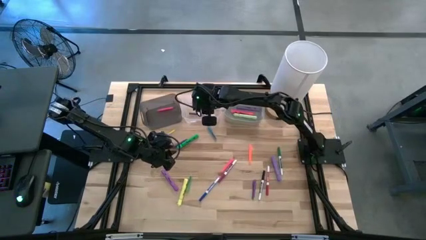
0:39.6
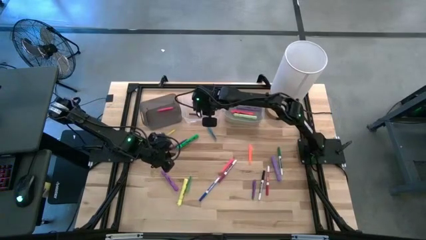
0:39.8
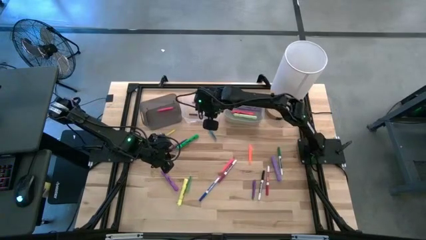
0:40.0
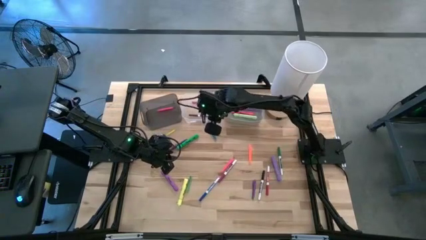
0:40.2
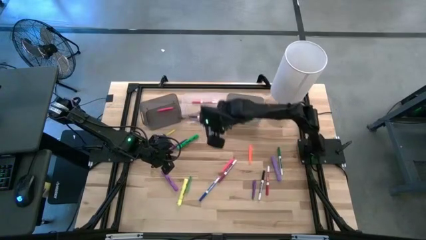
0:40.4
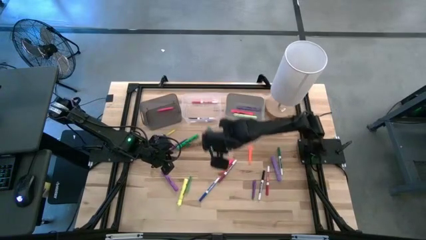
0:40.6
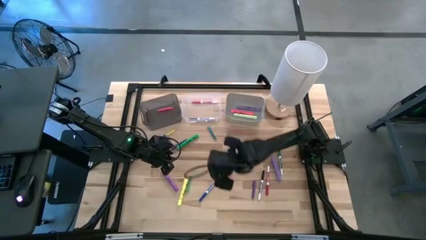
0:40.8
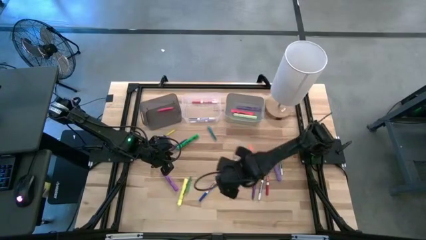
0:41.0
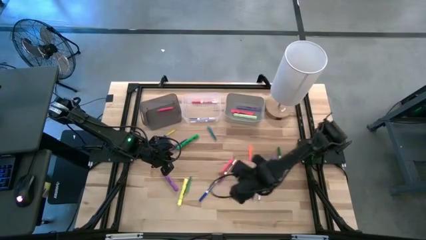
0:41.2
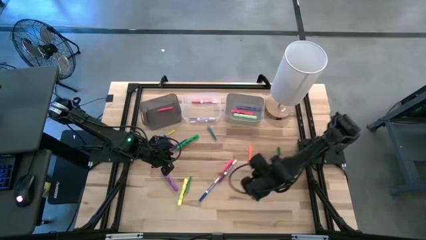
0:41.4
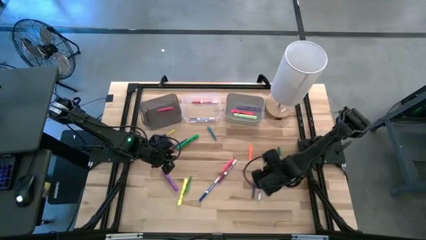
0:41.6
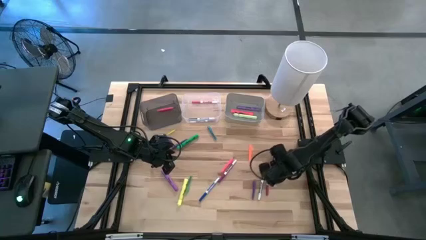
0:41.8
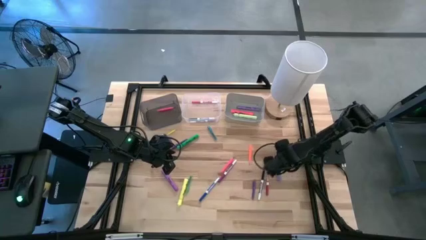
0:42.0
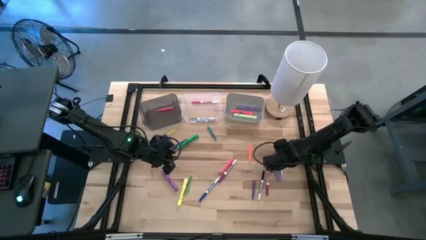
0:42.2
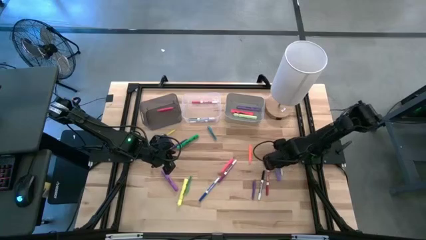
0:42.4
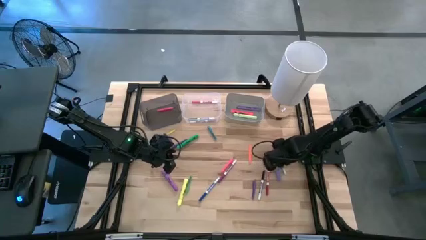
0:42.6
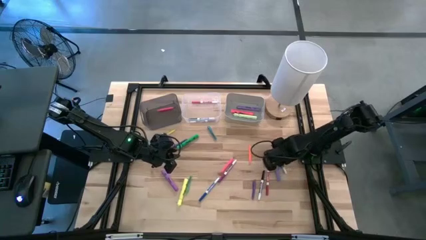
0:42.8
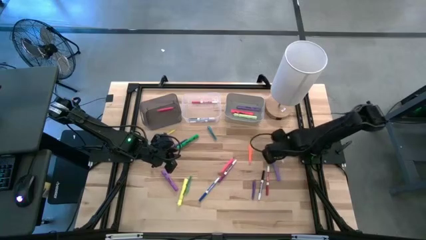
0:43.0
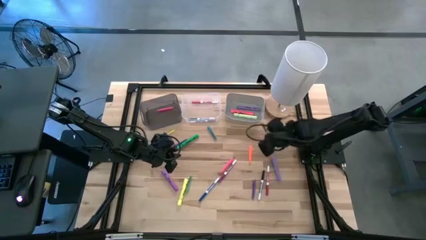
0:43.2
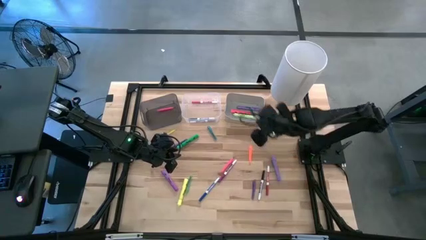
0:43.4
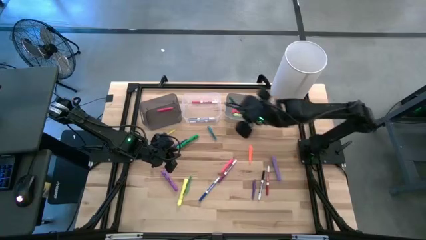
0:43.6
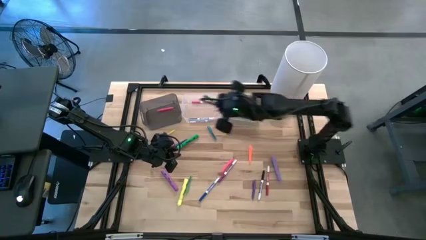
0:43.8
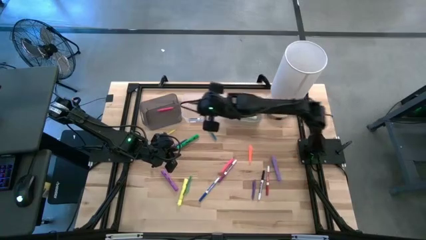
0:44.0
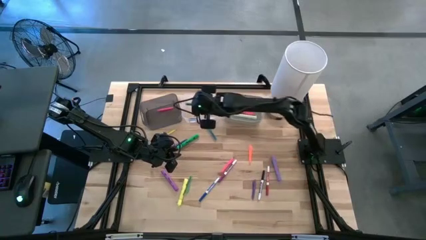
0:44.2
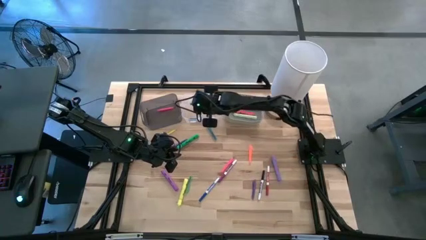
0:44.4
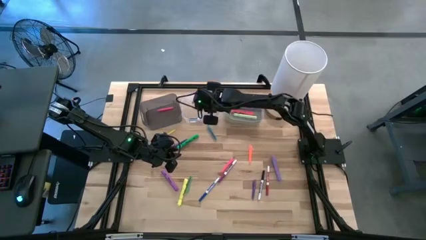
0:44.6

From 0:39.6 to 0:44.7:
Task: Pick & Place Markers
Put the green marker pen into the transparent bin

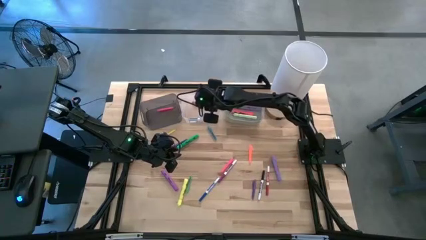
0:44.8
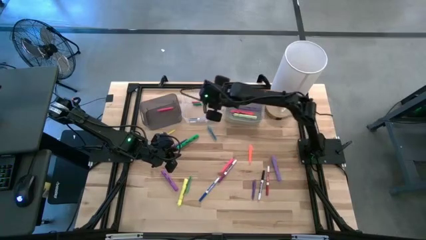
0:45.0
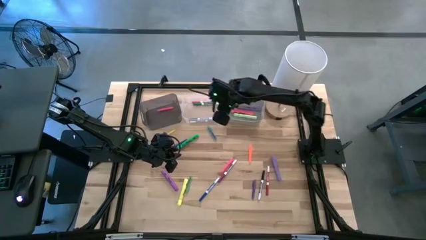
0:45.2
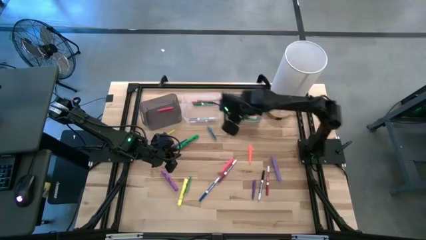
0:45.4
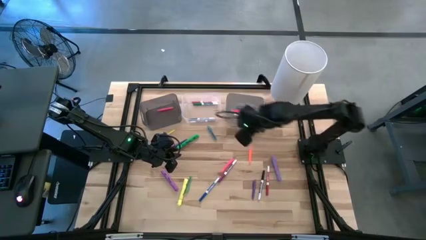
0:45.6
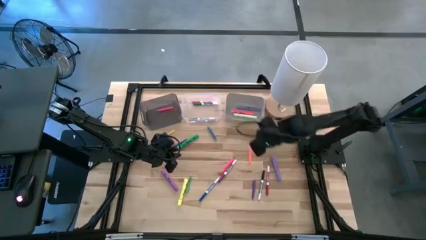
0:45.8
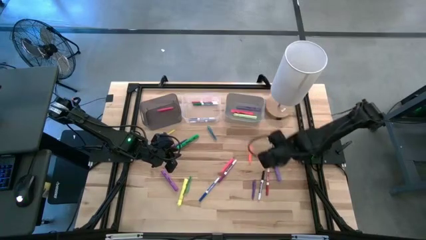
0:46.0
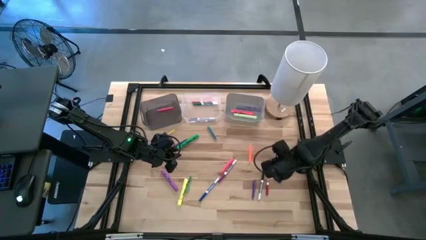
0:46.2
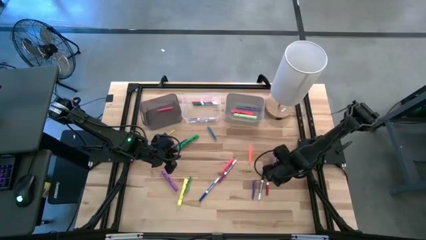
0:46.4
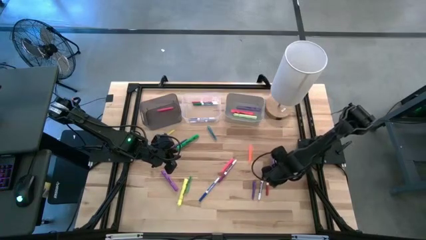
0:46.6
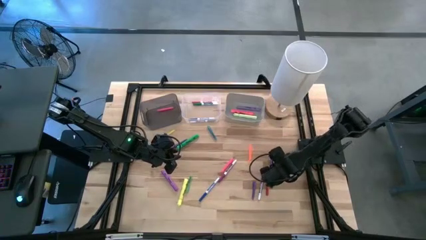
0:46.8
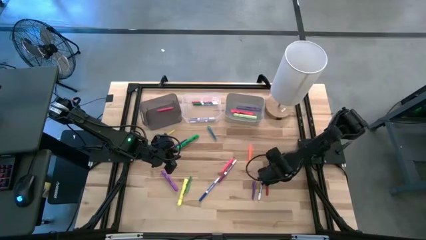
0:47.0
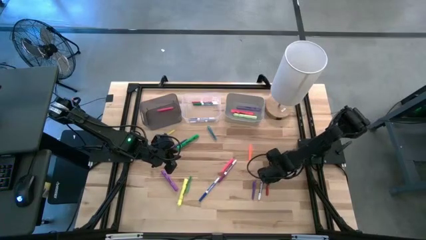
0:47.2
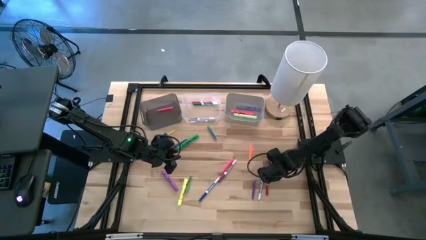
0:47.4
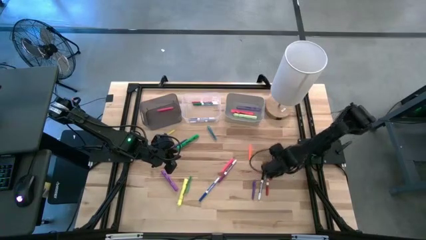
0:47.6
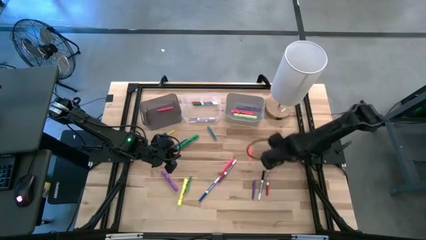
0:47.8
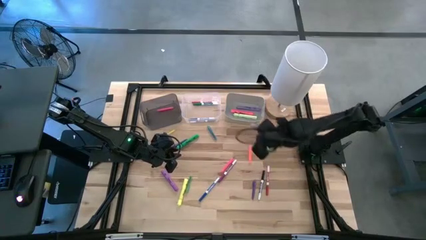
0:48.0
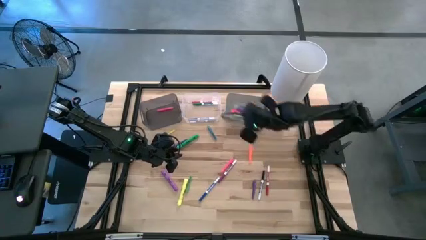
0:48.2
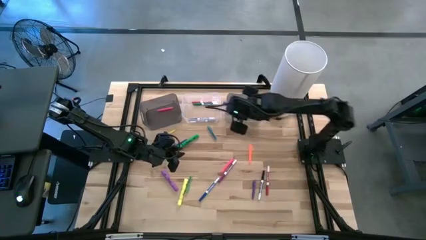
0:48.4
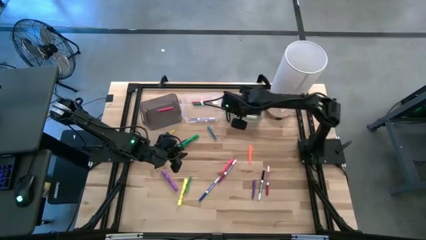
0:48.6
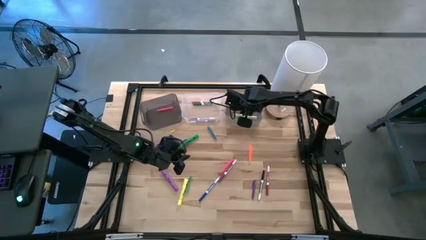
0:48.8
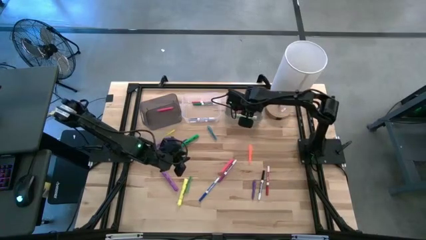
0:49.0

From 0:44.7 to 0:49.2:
Put the violet highlighter pen into the gray bin

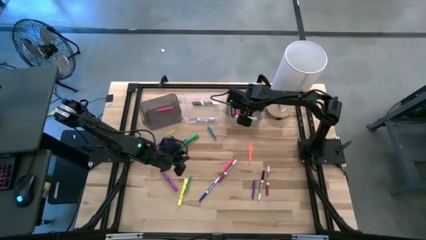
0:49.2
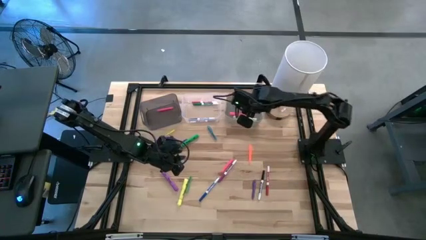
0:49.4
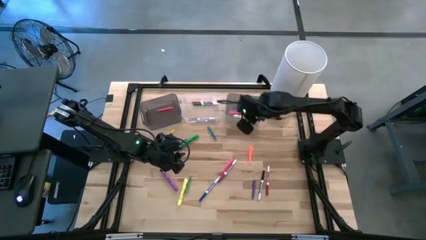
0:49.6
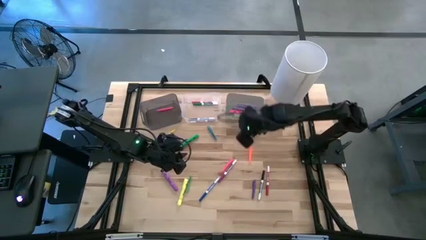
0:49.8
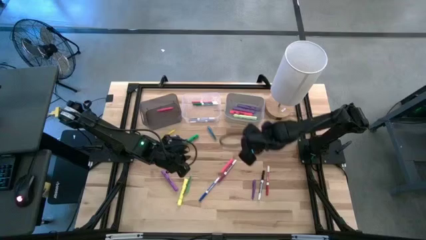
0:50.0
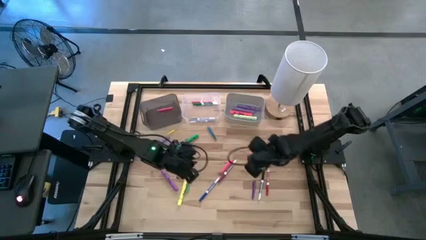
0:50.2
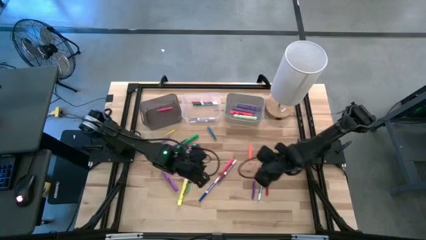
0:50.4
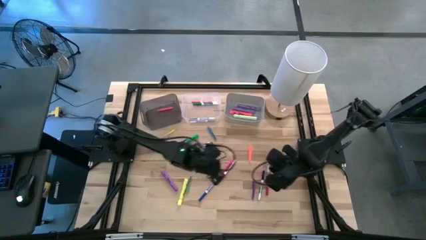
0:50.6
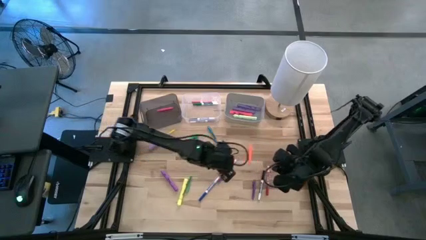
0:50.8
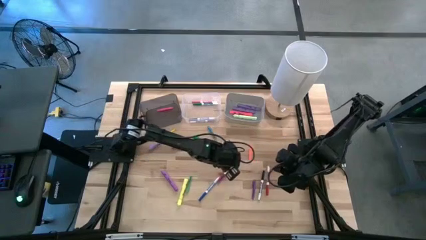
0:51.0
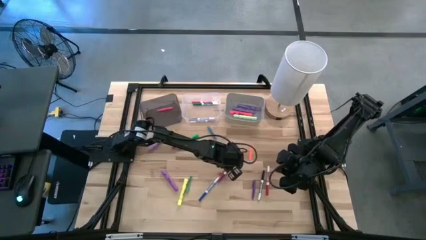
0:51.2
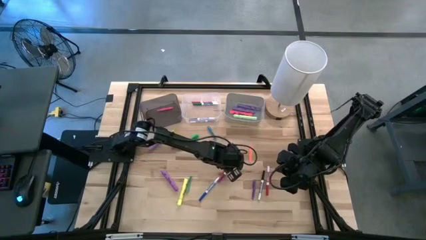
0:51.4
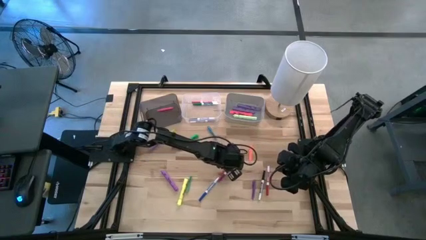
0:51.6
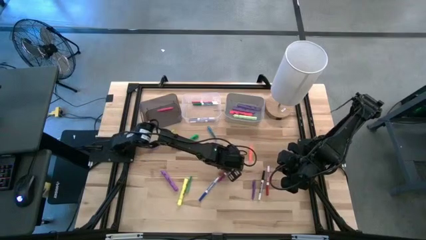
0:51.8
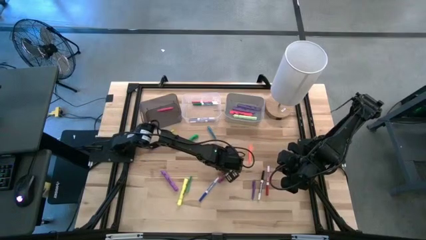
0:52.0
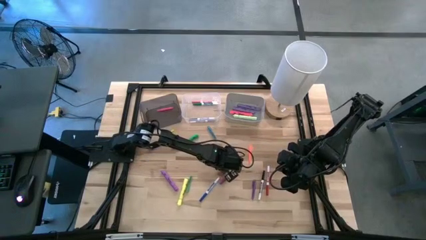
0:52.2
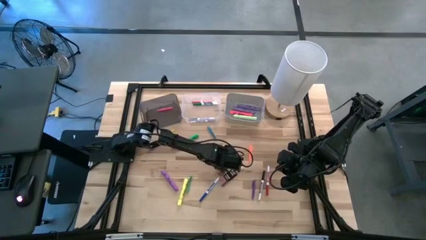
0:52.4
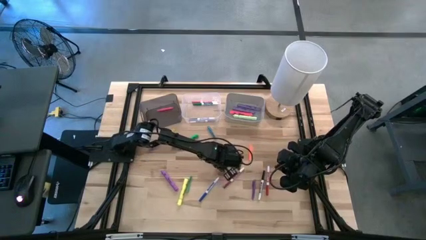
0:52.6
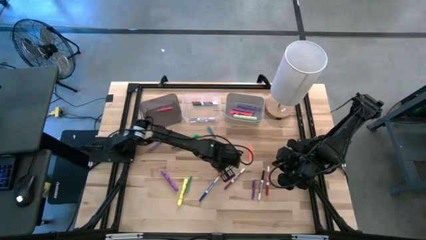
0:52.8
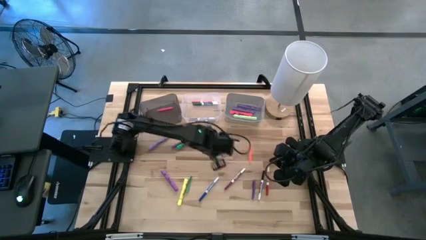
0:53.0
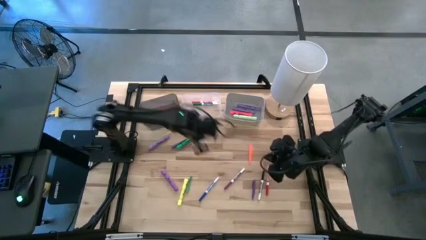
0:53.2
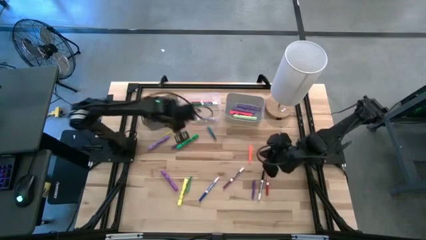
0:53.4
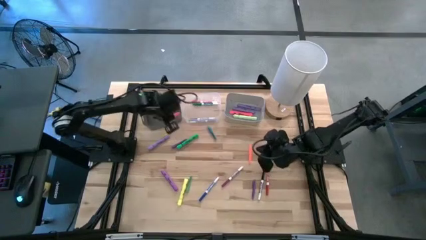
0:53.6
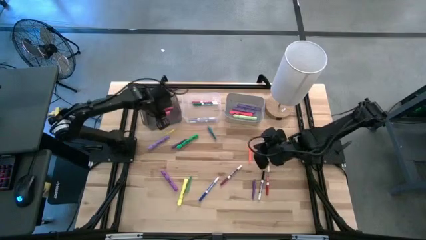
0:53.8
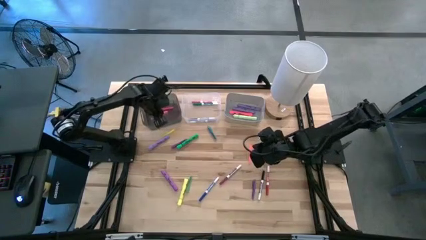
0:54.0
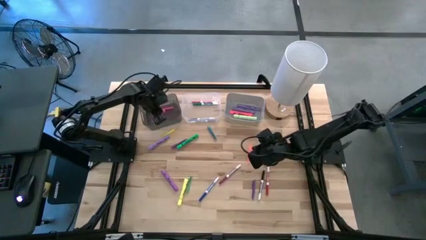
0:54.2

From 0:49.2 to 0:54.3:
Put the pink pen into the black bin

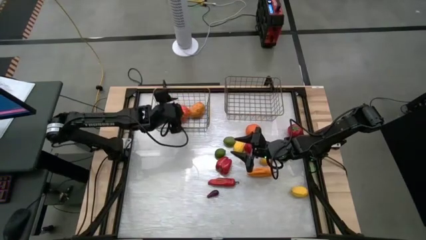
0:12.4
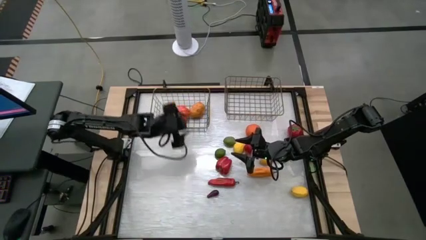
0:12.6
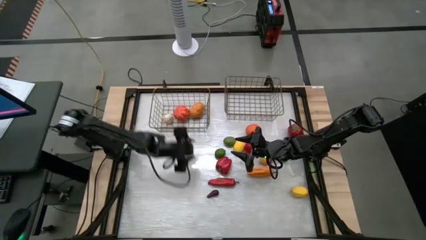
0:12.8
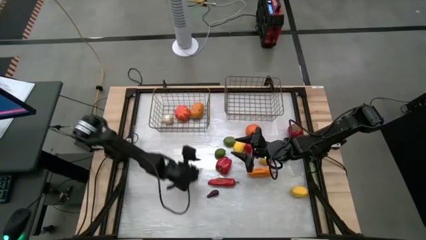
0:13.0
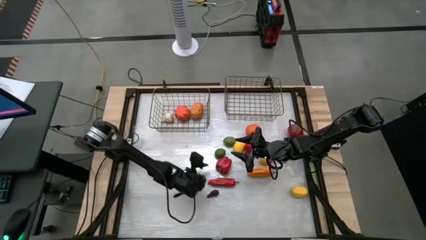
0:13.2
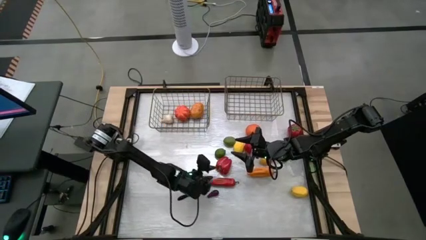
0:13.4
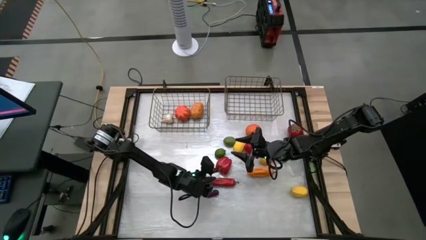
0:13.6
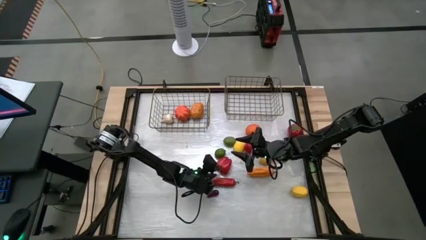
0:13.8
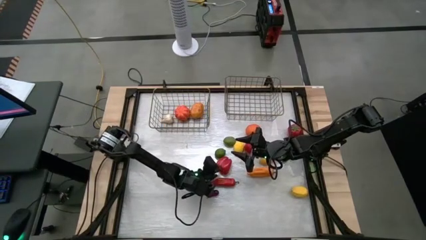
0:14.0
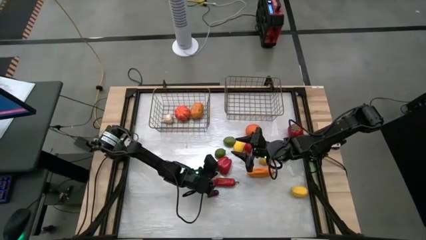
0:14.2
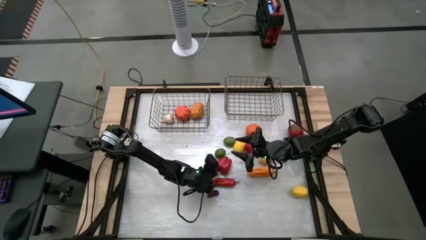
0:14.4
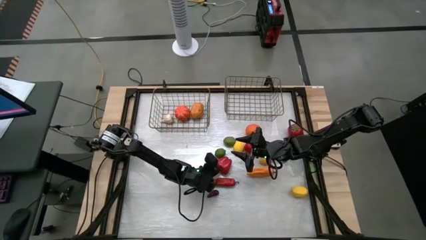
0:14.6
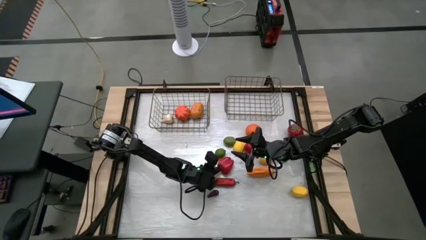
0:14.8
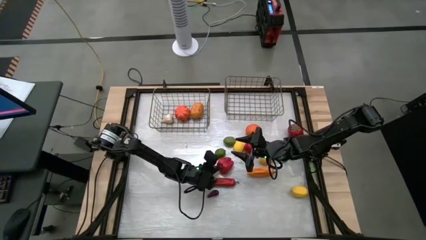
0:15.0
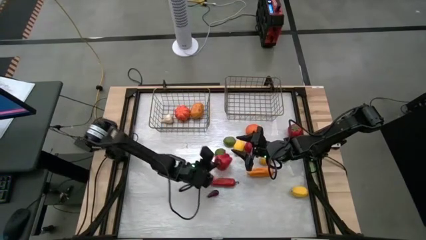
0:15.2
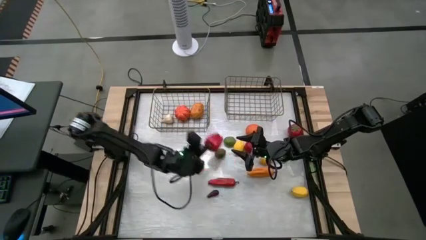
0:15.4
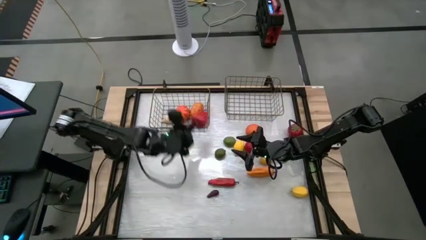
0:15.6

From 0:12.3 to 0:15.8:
Task: Sort produce into baskets
Put the red bell pepper into the left gold wire basket
